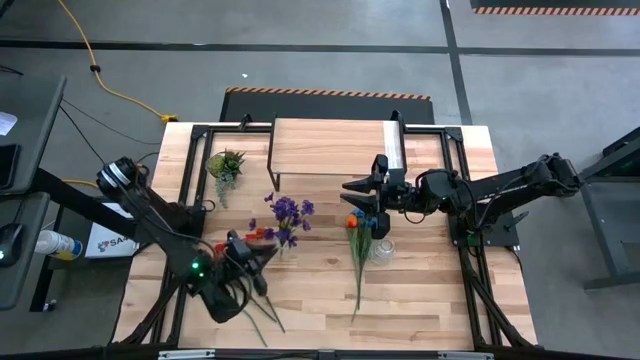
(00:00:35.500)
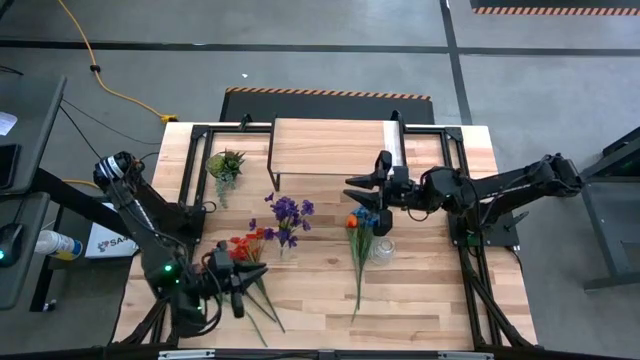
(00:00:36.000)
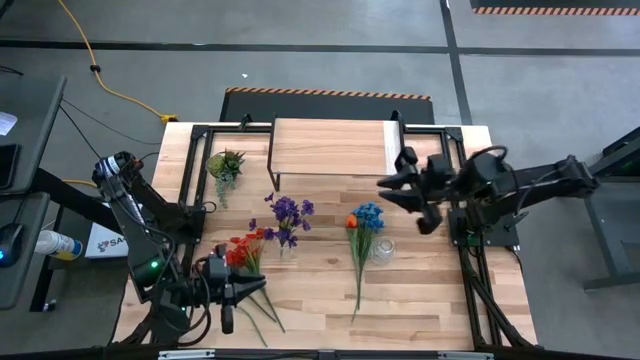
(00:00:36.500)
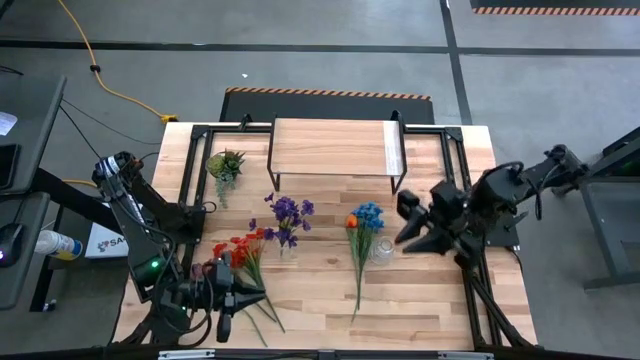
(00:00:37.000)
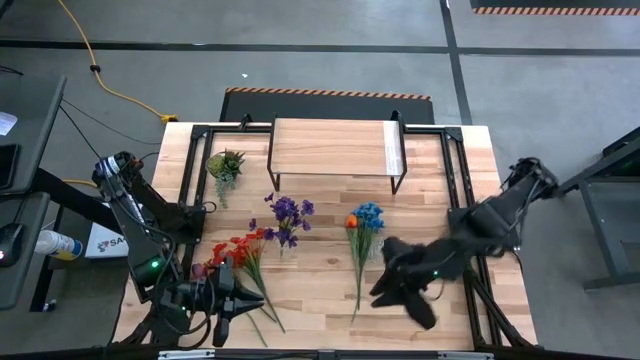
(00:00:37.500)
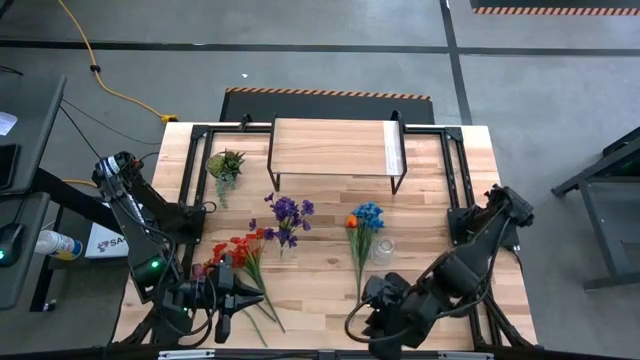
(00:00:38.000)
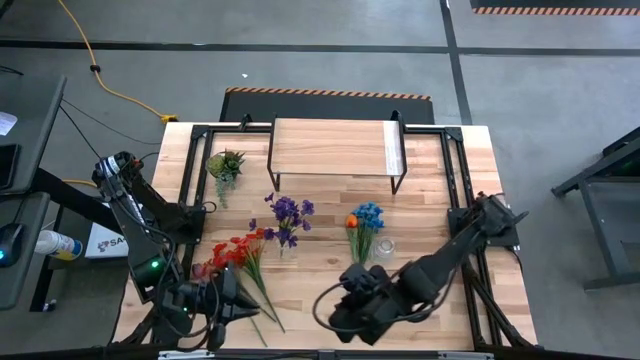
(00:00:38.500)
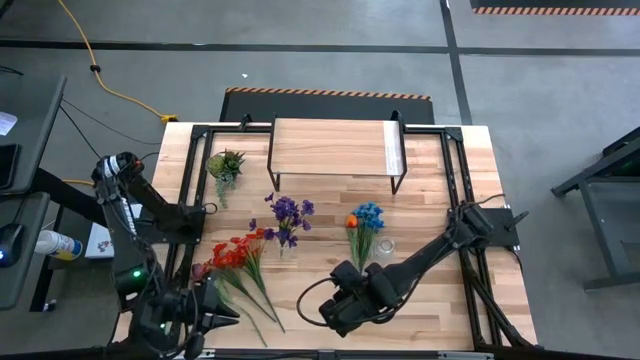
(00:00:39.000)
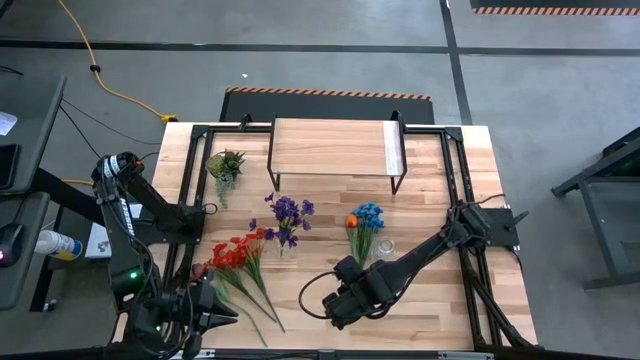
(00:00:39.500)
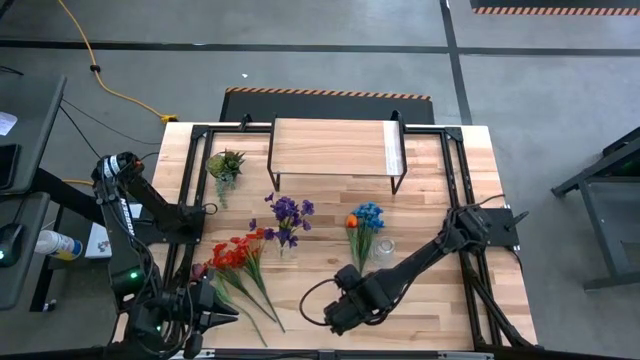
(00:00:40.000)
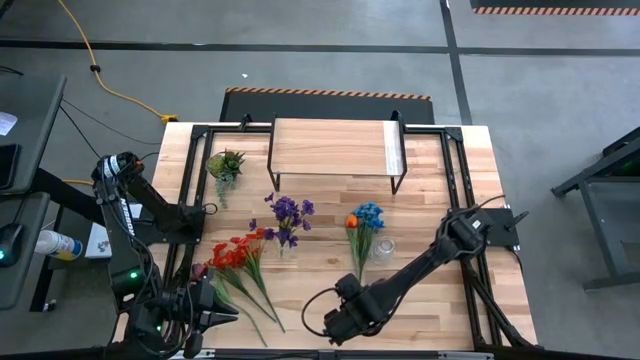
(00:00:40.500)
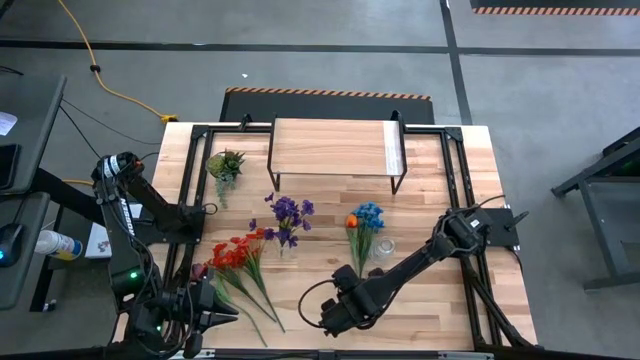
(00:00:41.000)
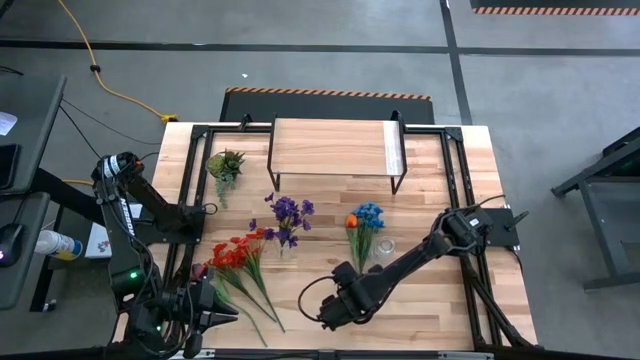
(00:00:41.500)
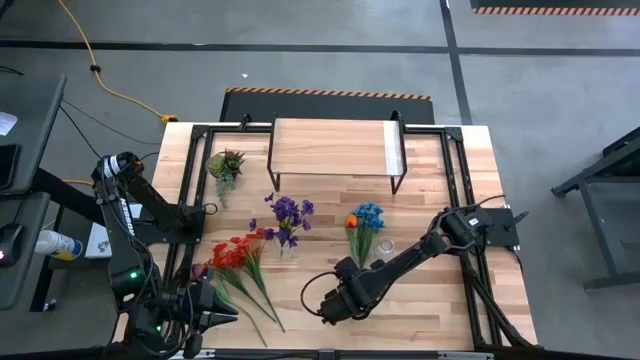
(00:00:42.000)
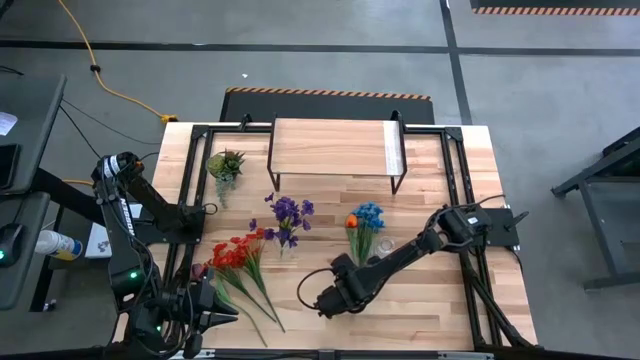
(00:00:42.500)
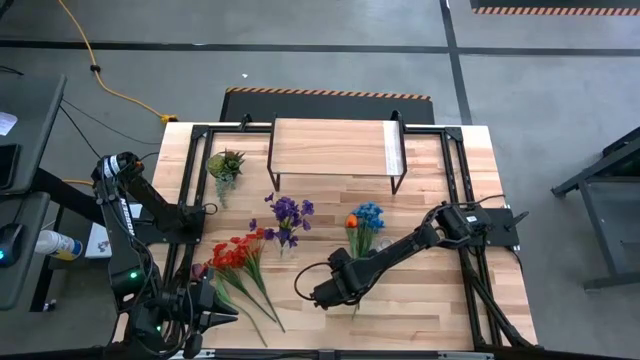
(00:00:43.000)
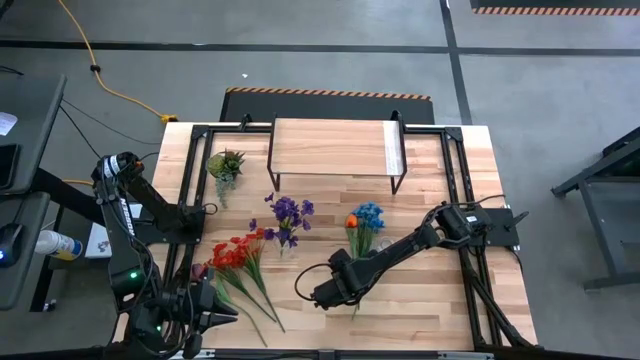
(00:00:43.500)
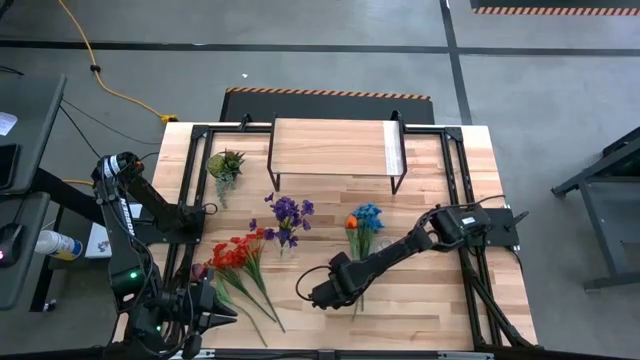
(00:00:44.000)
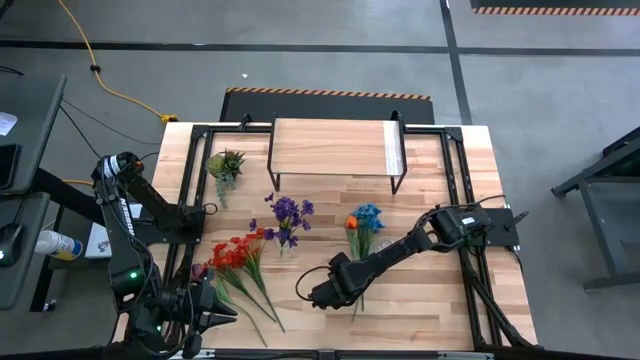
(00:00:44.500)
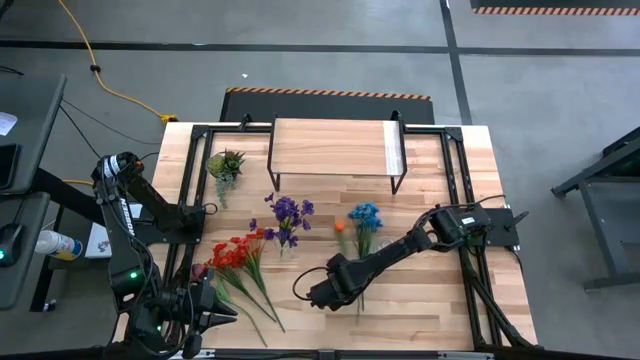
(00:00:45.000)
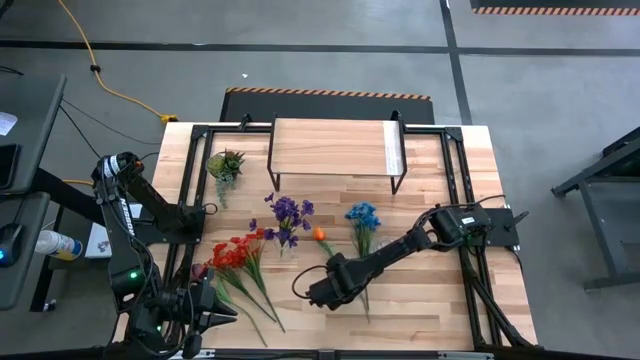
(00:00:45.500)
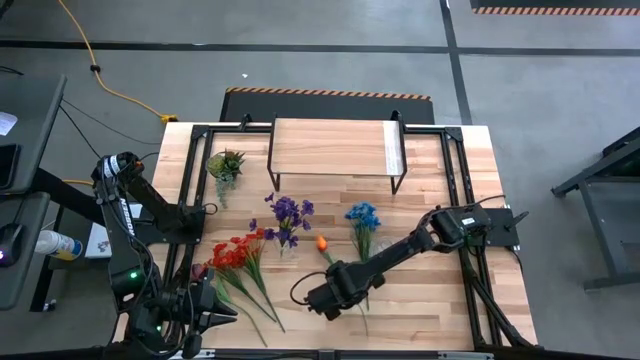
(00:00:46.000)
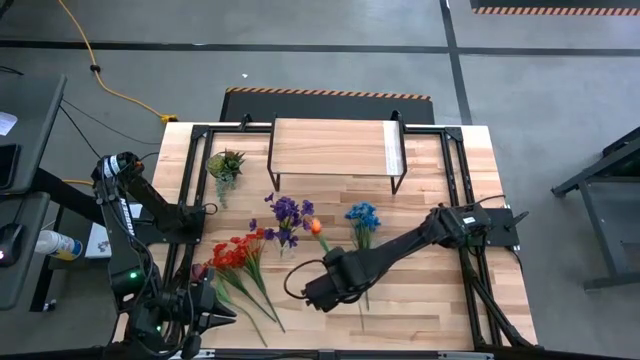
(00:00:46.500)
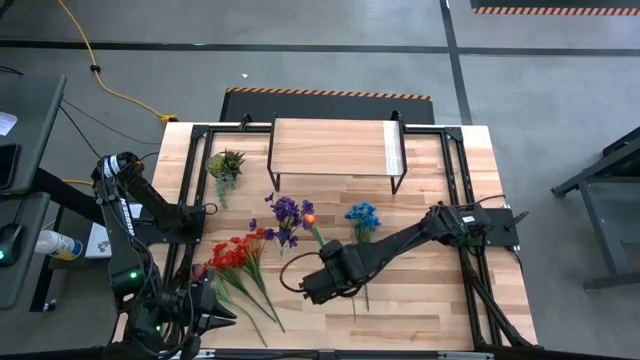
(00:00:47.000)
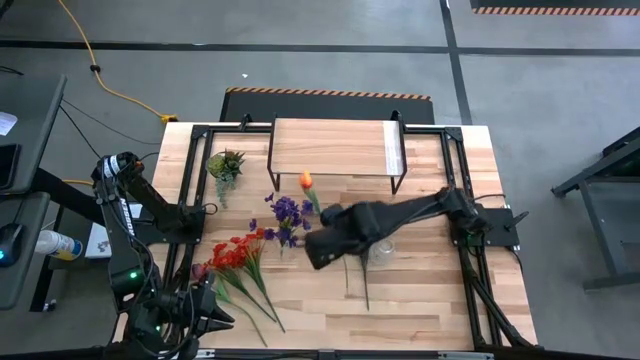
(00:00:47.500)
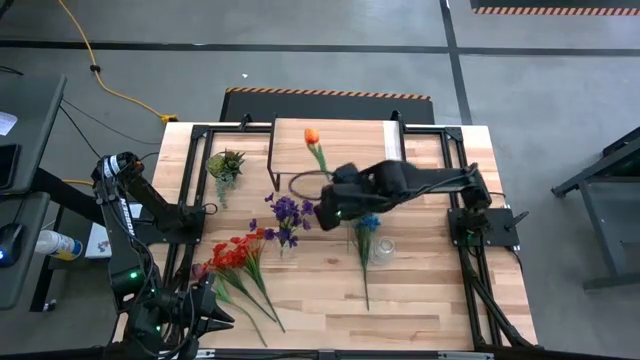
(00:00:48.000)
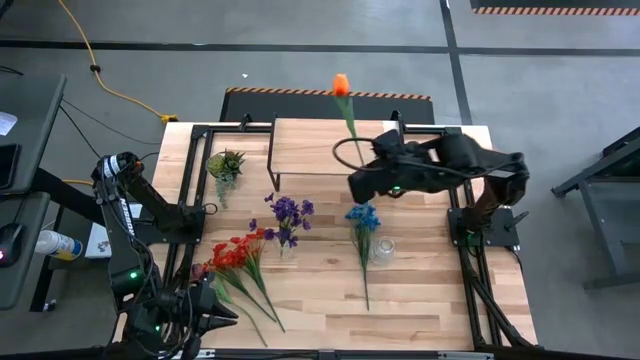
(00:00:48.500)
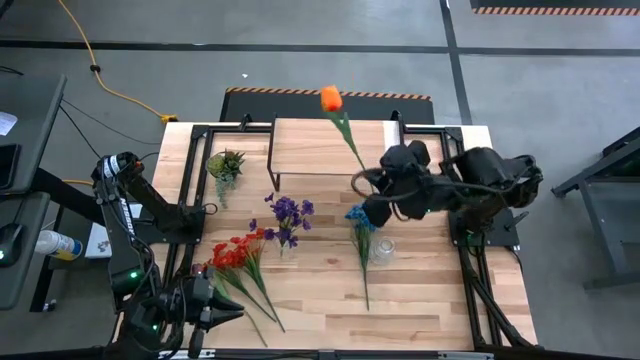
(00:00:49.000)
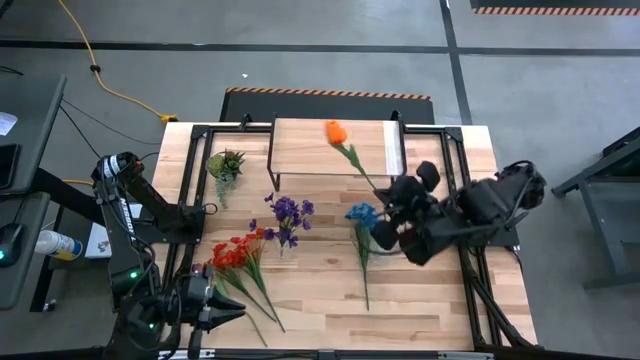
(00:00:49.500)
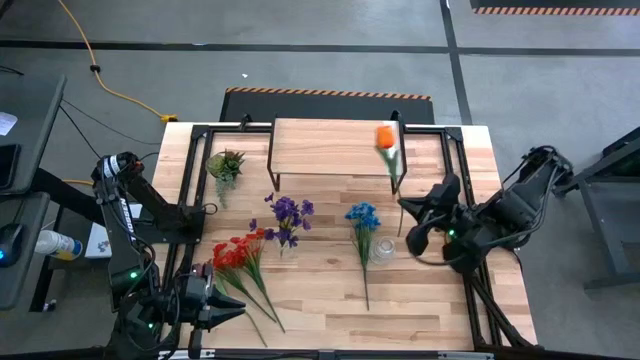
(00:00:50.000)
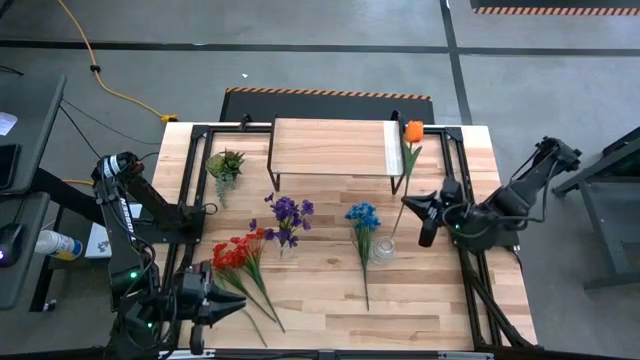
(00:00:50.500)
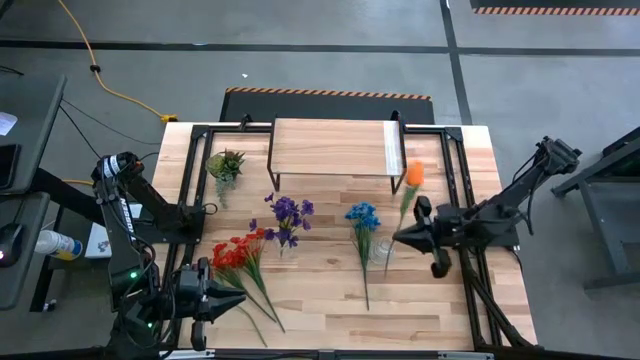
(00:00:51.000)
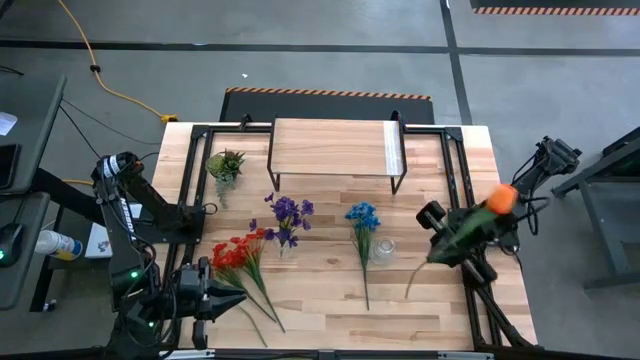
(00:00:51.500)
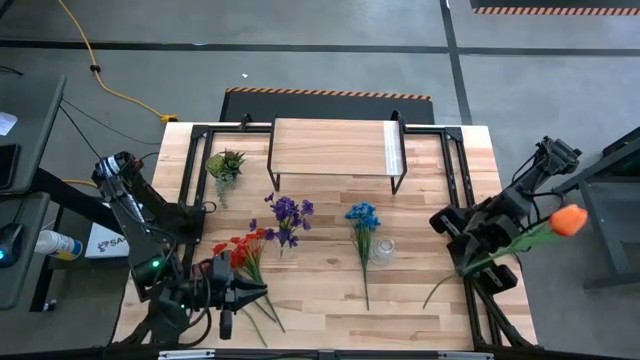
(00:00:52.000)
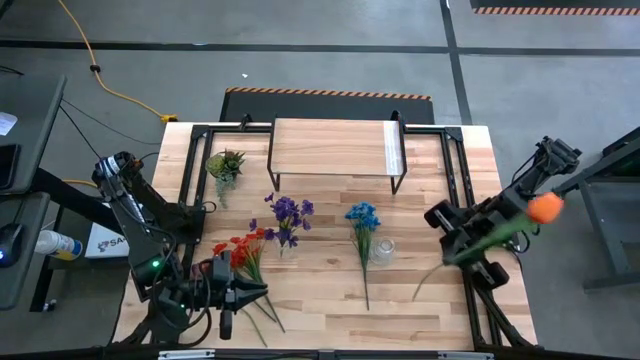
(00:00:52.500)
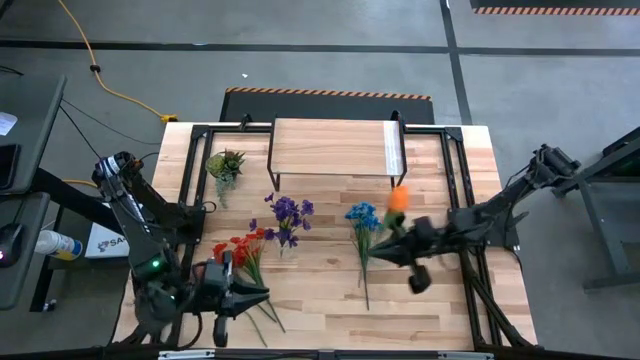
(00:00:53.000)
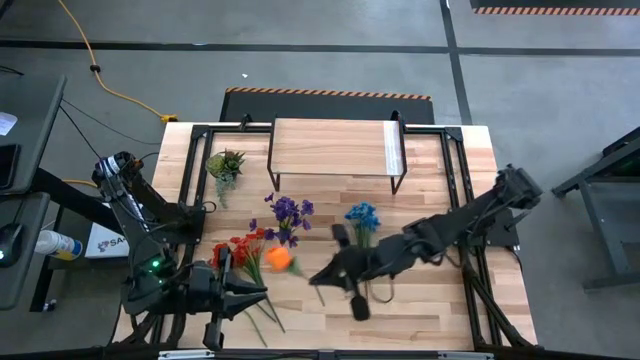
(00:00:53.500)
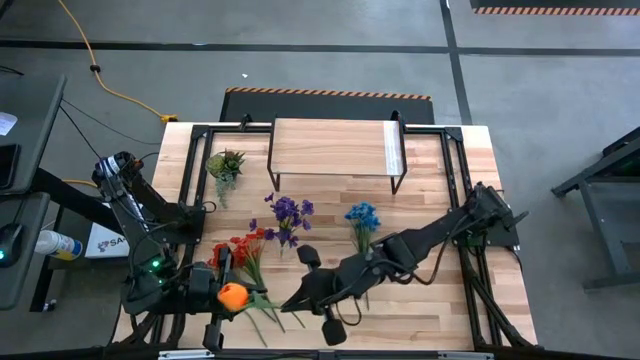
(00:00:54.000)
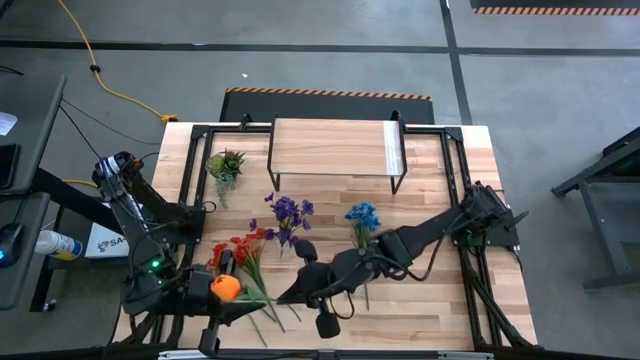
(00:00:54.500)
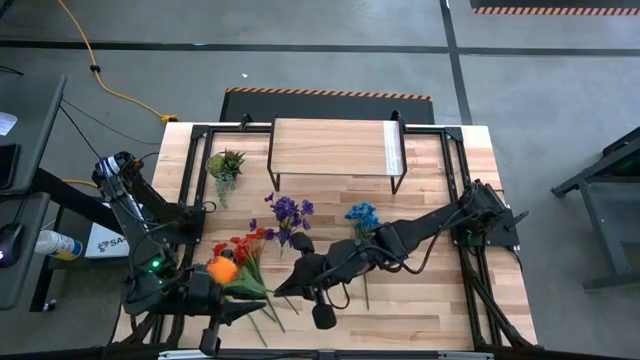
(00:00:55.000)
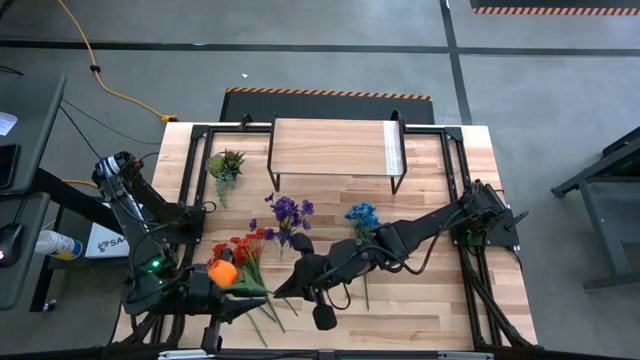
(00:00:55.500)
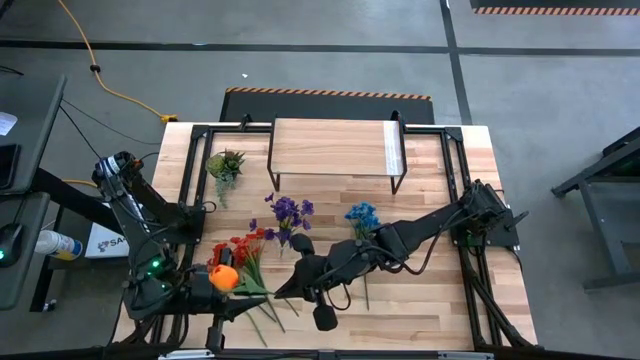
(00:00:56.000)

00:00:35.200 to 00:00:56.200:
Task: Pick and place flowers into a vace then onto a shelf
Put the orange flower into the left transparent flower vase
